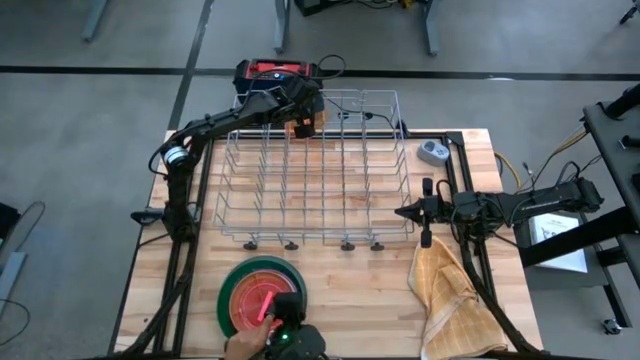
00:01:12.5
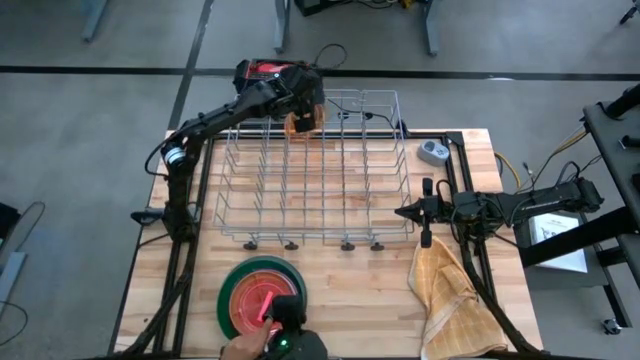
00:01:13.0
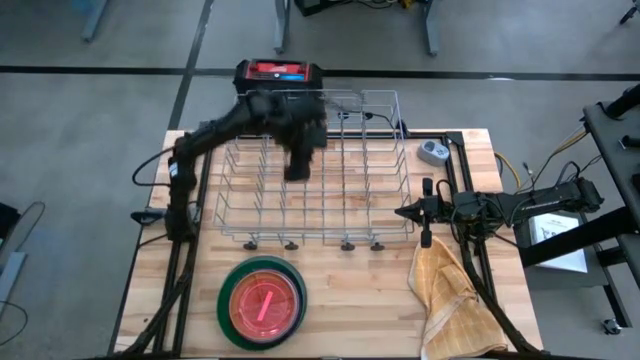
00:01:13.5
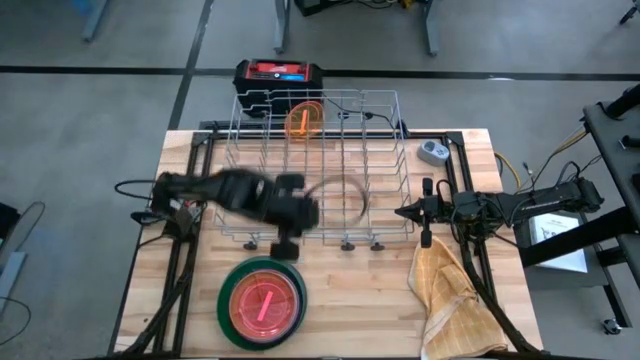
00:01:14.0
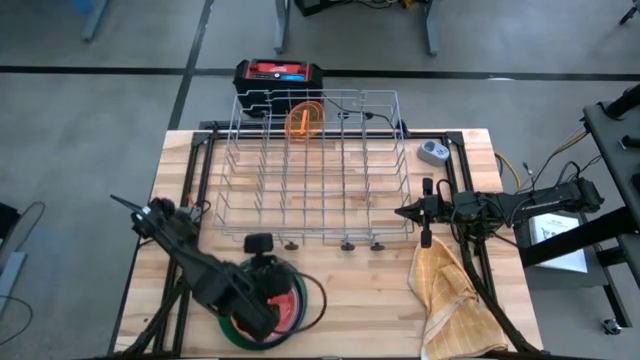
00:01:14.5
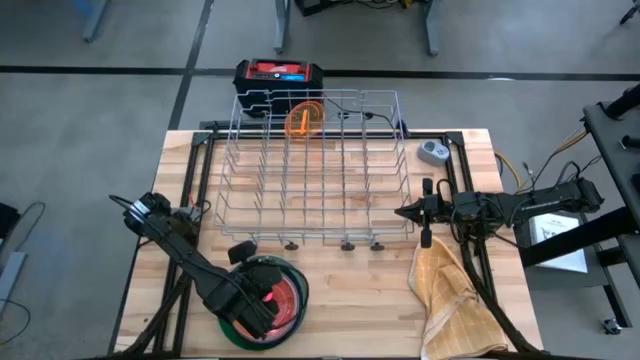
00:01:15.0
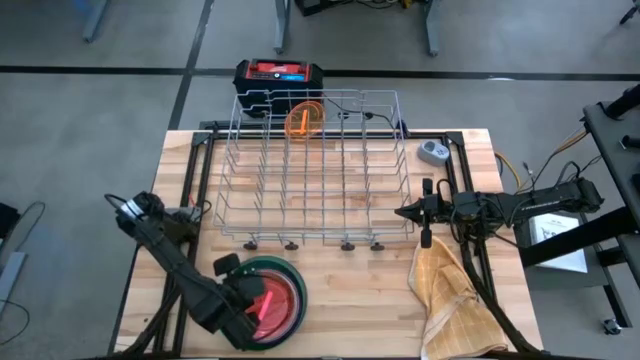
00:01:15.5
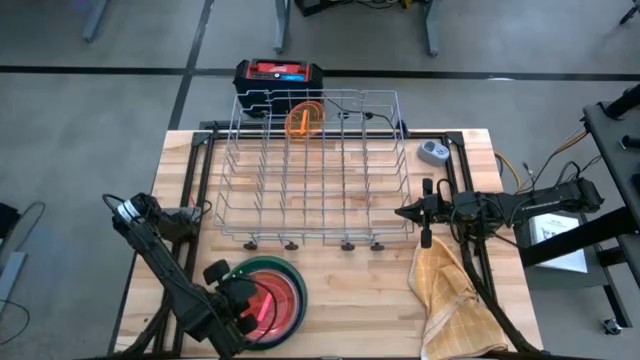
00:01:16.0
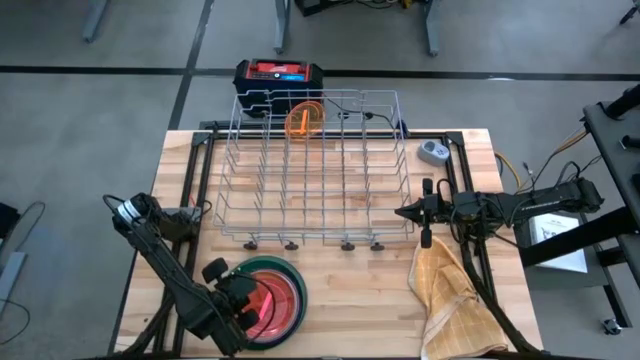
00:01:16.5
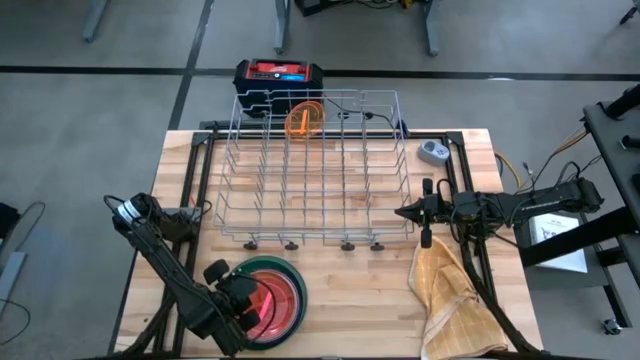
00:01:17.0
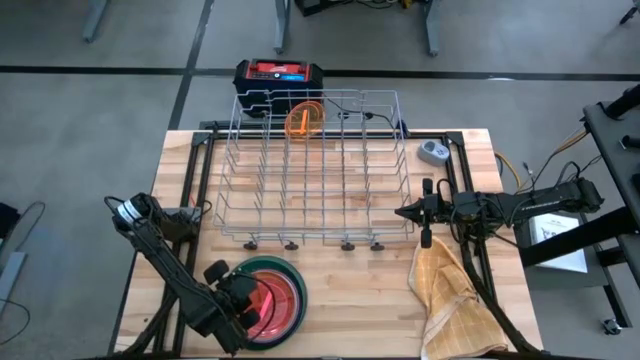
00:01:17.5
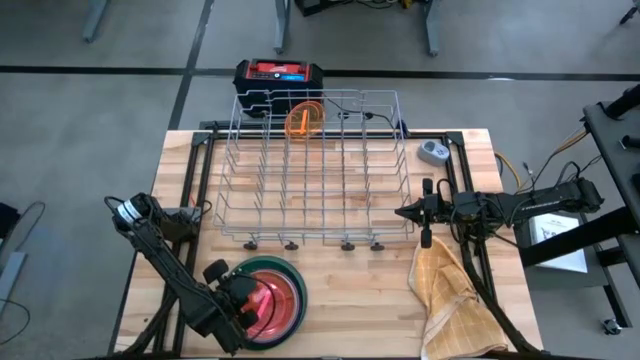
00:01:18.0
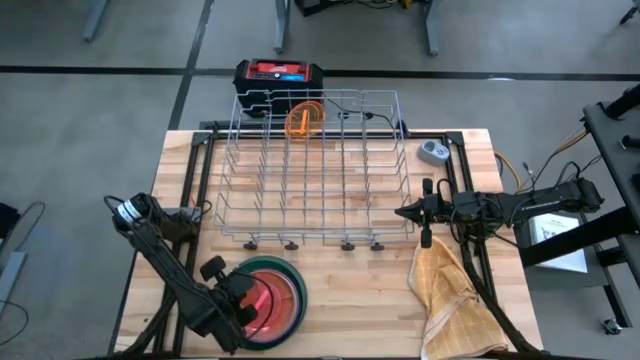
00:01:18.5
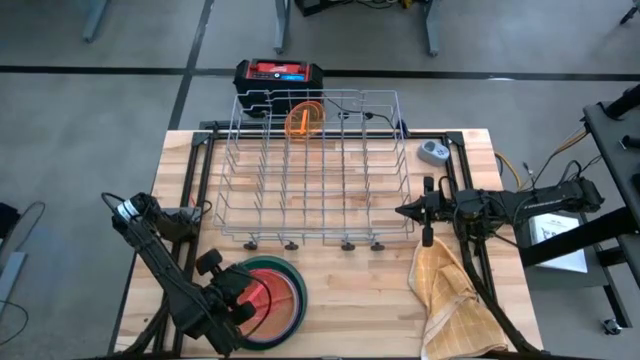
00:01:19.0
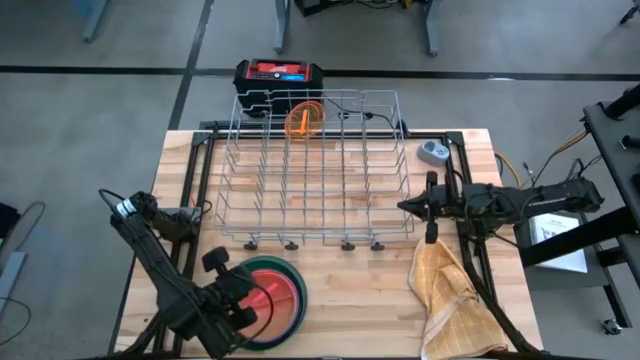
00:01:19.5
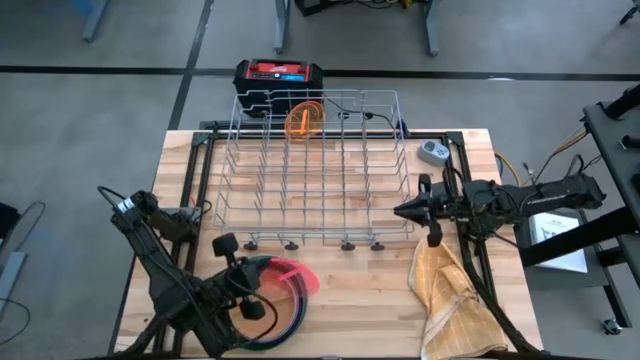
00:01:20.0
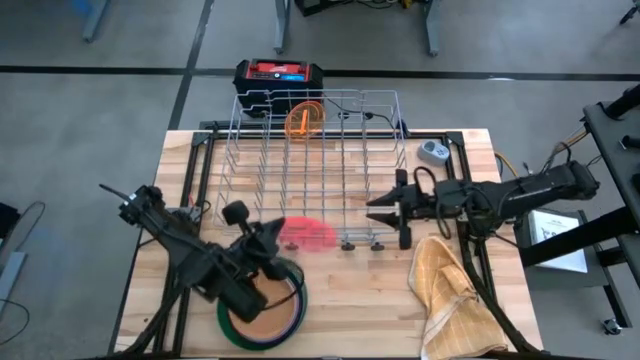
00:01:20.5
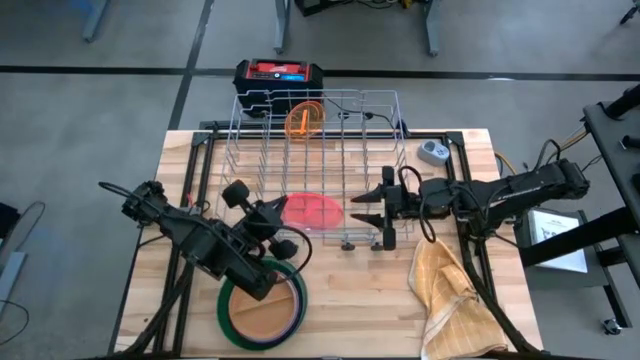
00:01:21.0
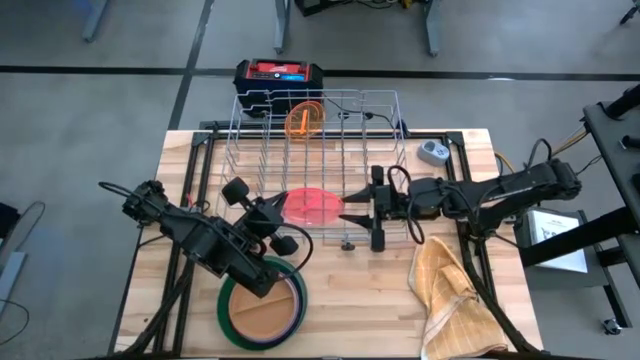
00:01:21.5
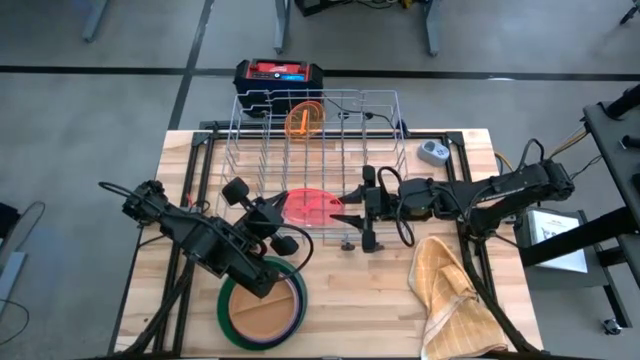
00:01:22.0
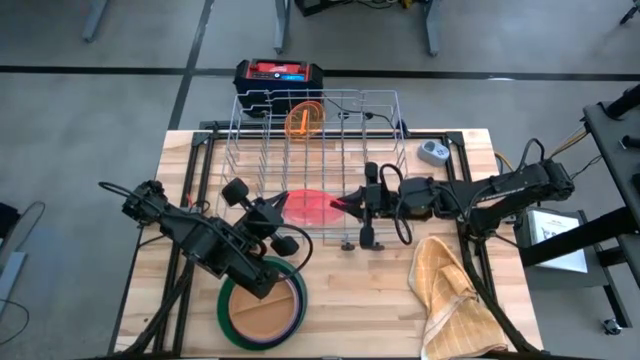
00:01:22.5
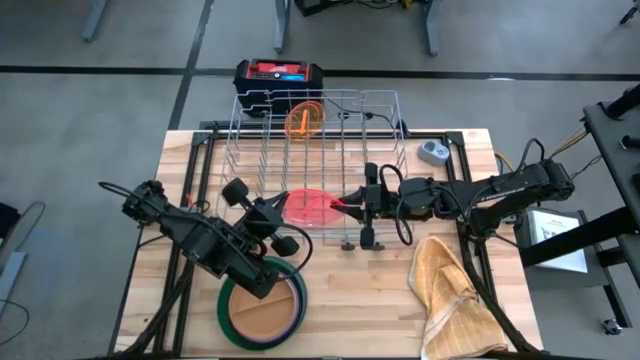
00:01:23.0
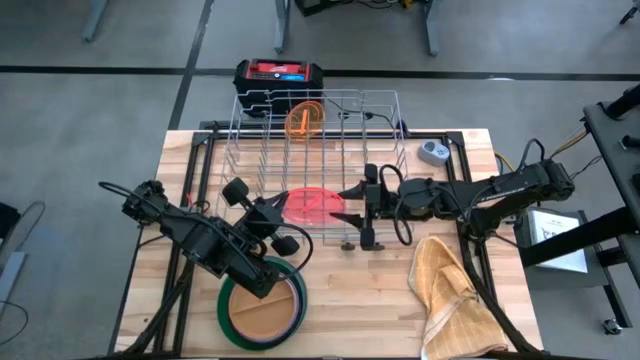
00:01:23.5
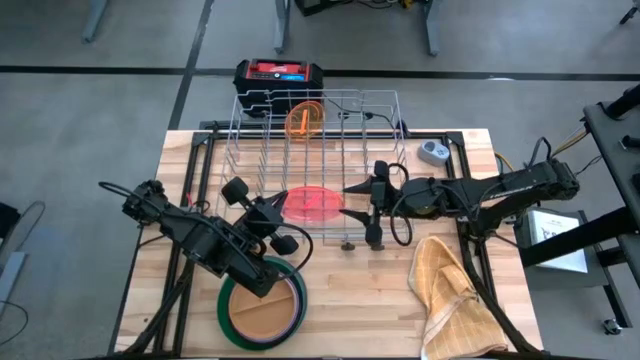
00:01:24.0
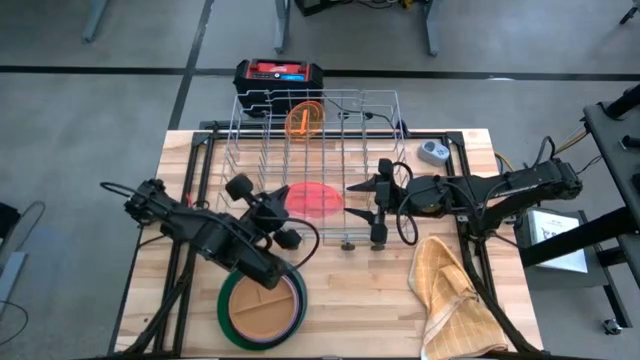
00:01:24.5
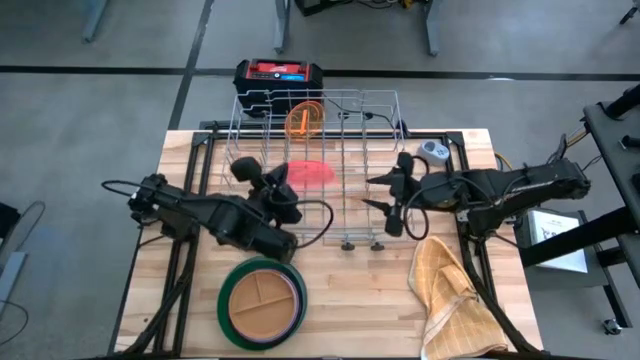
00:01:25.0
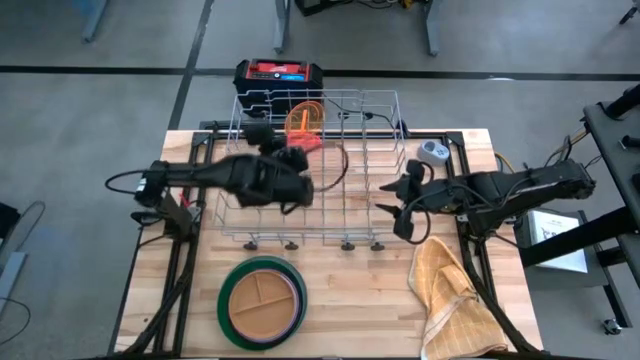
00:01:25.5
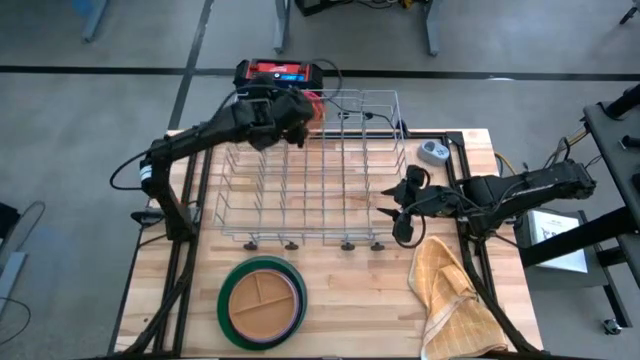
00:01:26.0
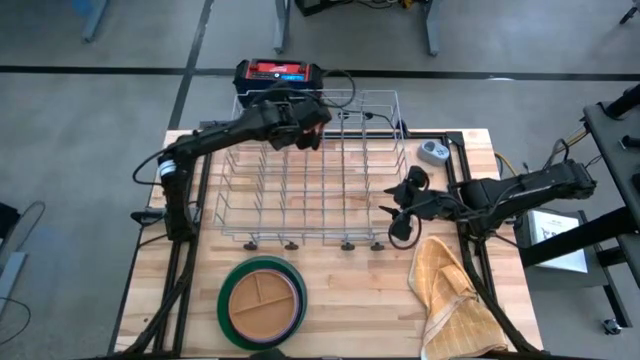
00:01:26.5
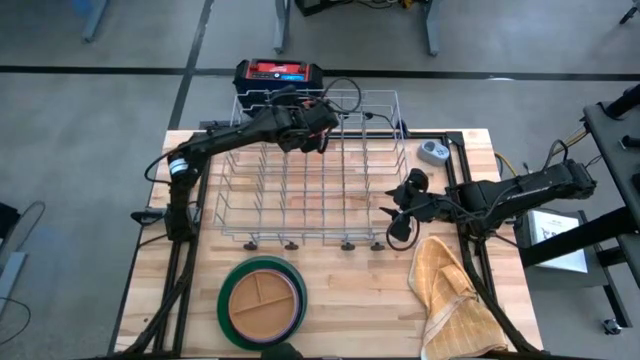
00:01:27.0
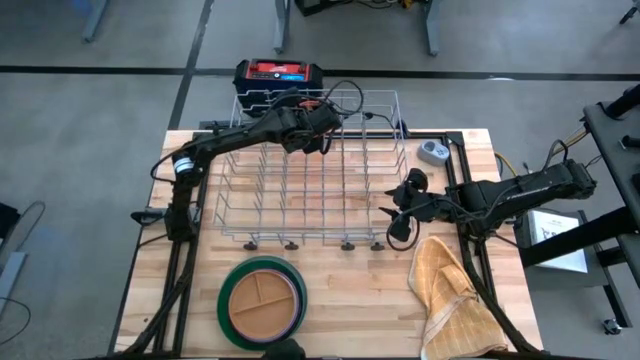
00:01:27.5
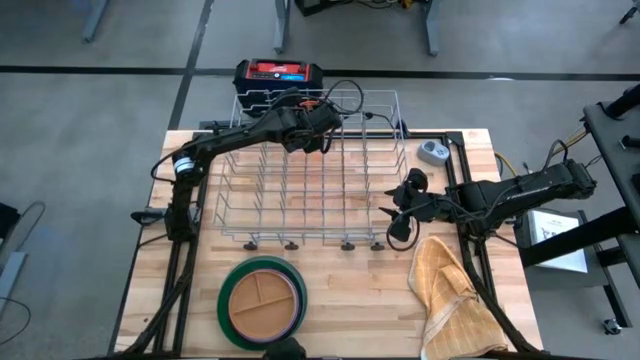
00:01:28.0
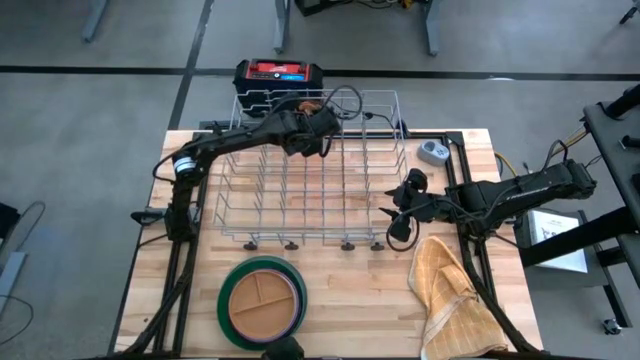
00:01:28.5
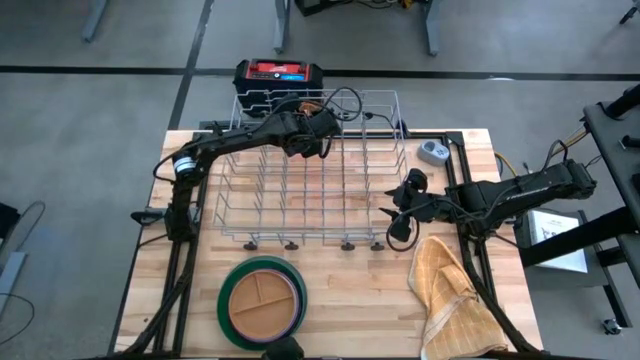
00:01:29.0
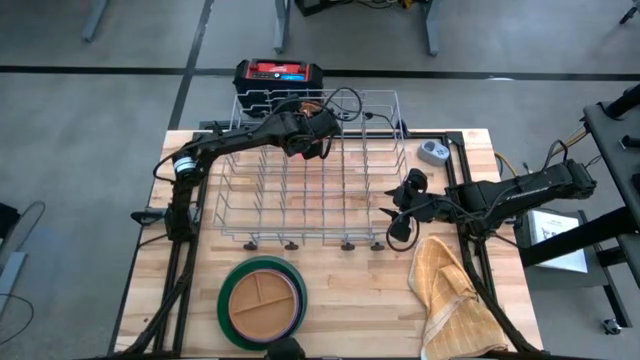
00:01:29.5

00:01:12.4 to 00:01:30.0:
Task: Sort dishes
Put the transparent pink plate into the dish rack

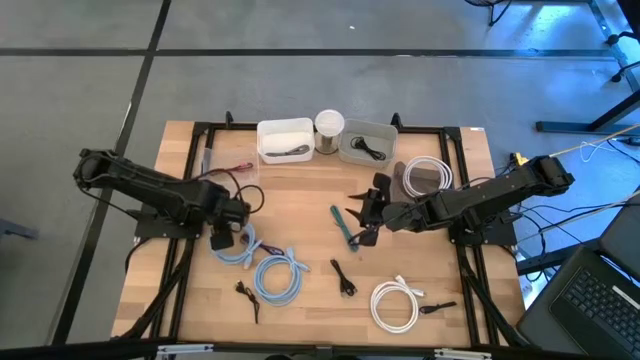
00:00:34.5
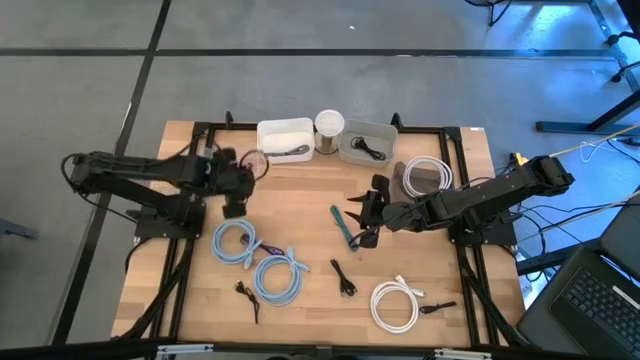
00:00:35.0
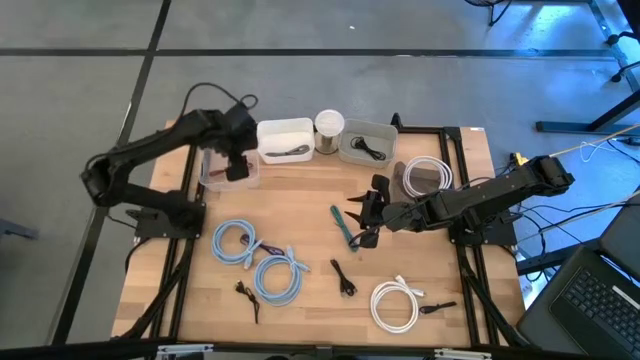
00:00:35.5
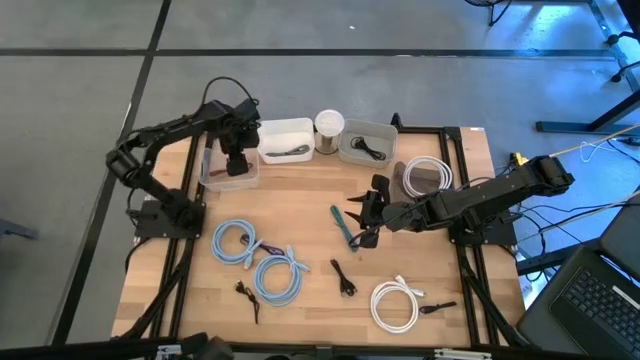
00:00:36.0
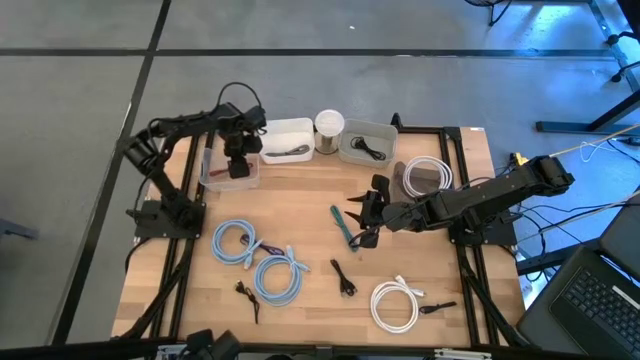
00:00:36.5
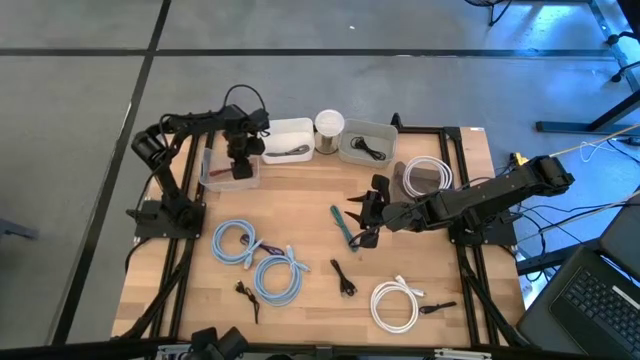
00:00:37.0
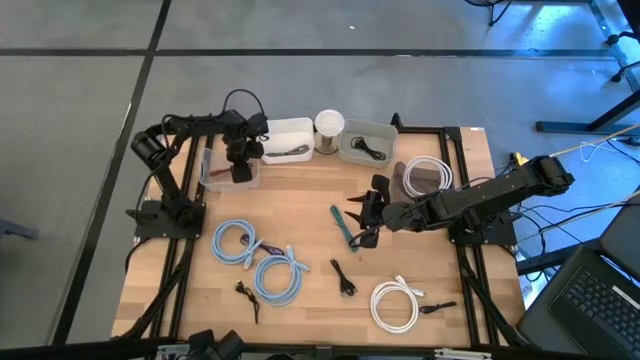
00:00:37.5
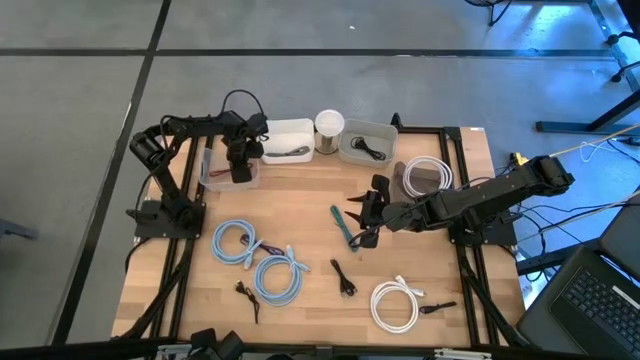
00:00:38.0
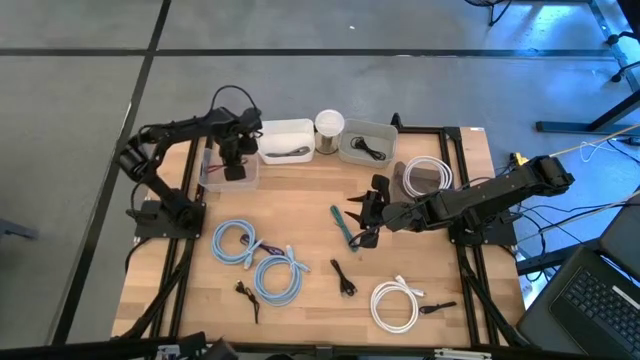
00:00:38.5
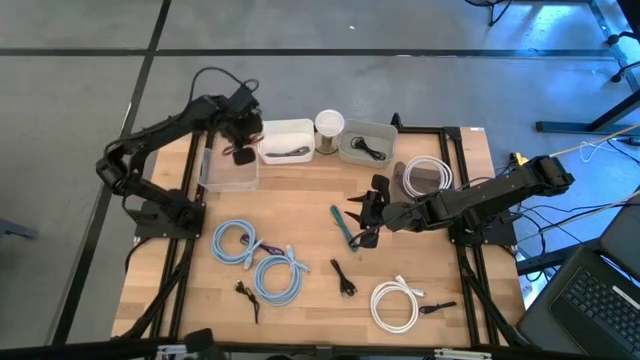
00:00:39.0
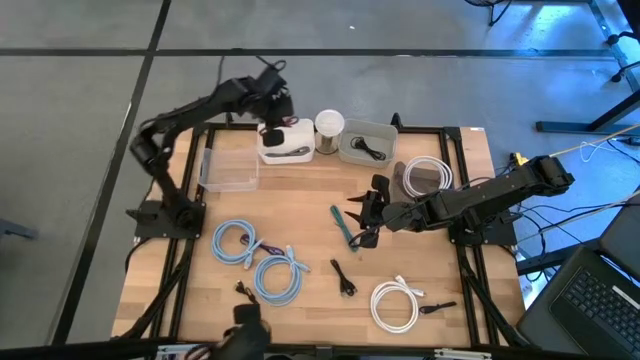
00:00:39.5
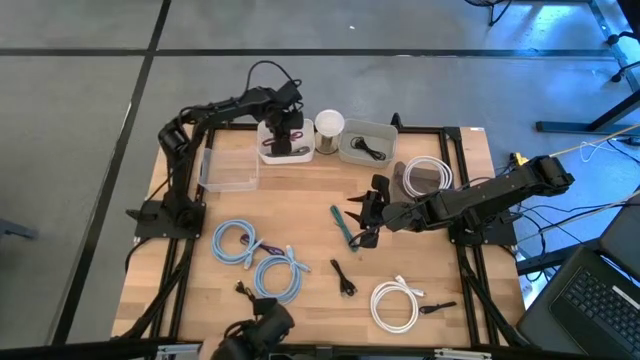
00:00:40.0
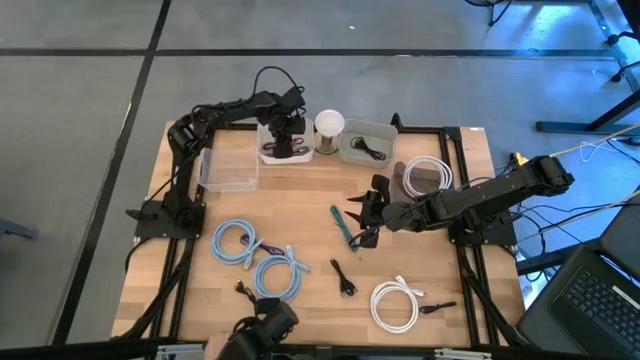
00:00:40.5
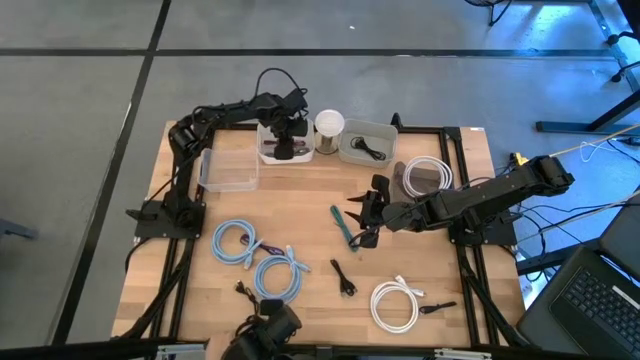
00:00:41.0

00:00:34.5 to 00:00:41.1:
Task: Pick & Place USB Port
Put the black and pink USB cable into the transparent bin
